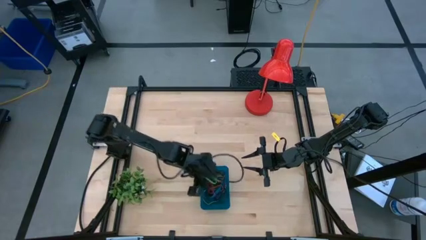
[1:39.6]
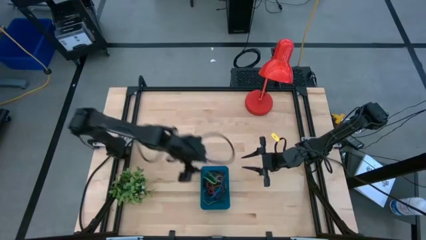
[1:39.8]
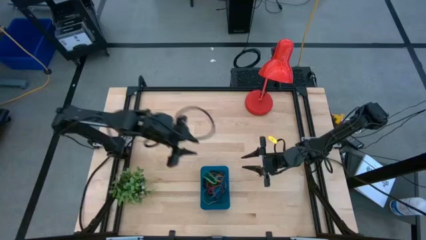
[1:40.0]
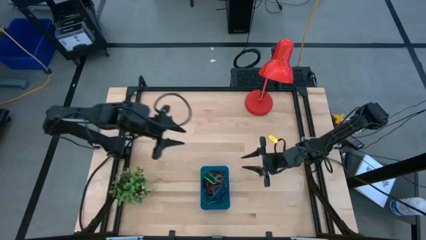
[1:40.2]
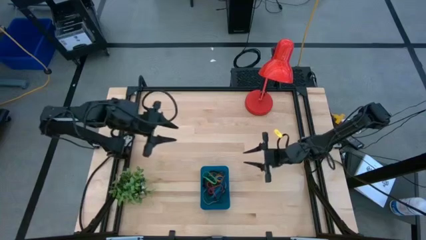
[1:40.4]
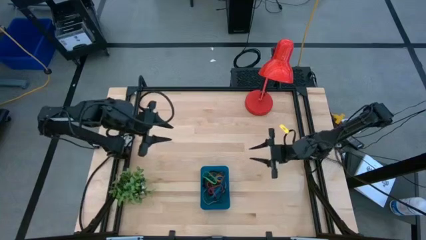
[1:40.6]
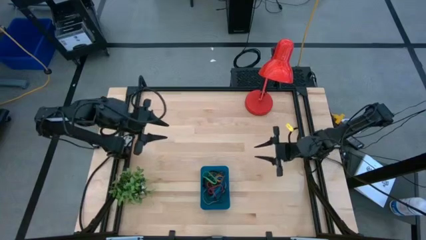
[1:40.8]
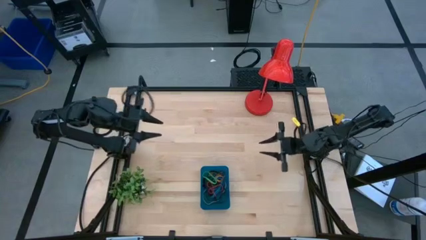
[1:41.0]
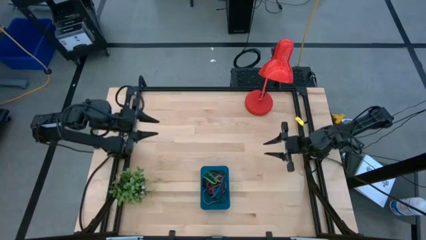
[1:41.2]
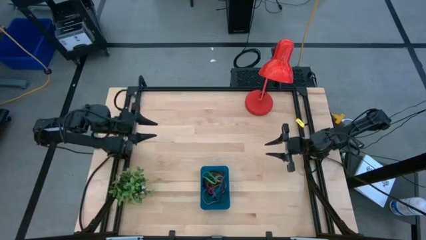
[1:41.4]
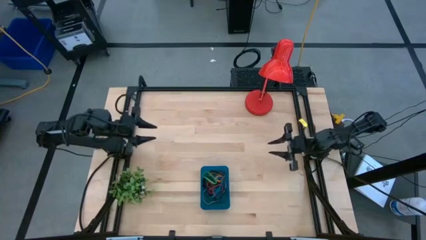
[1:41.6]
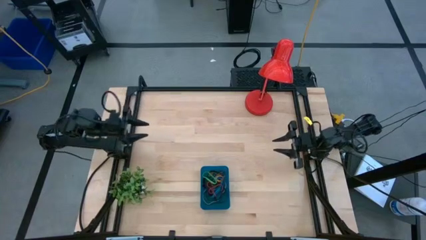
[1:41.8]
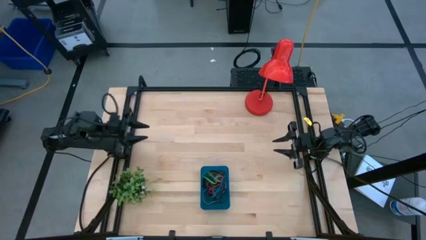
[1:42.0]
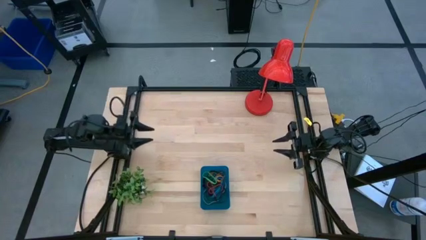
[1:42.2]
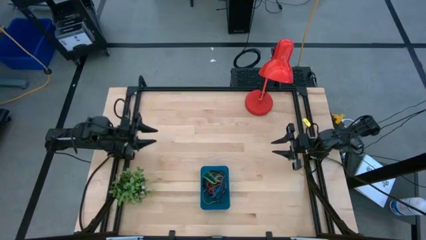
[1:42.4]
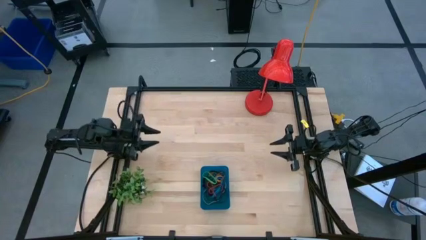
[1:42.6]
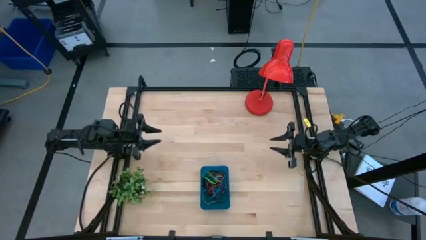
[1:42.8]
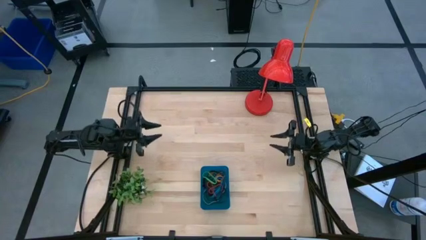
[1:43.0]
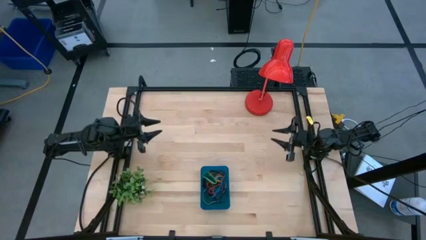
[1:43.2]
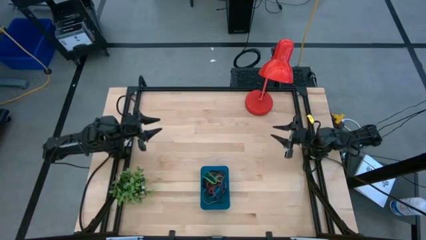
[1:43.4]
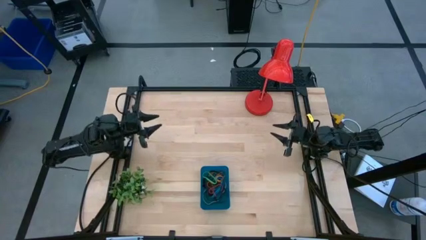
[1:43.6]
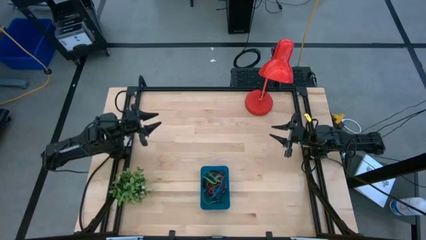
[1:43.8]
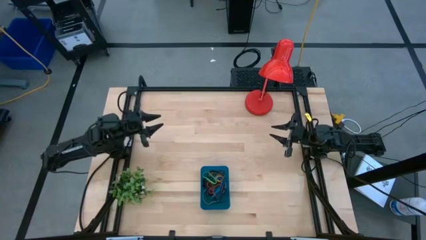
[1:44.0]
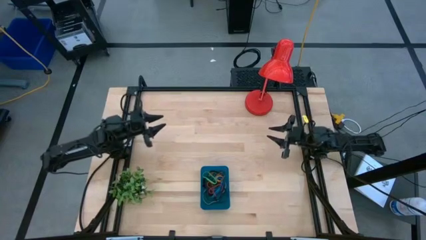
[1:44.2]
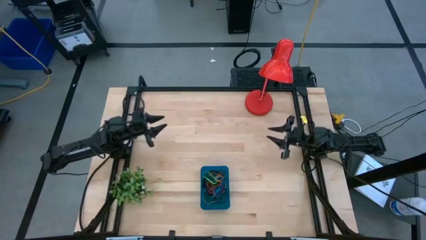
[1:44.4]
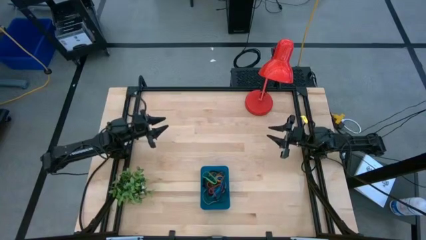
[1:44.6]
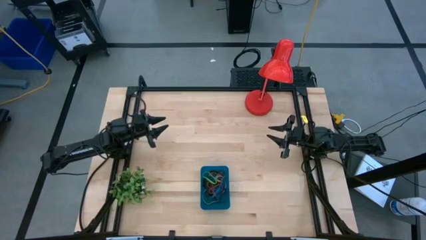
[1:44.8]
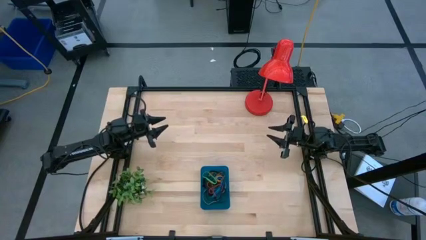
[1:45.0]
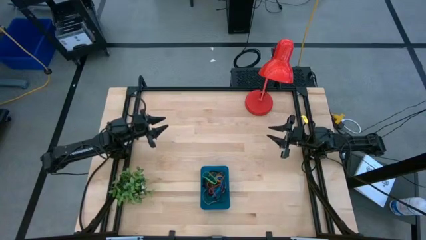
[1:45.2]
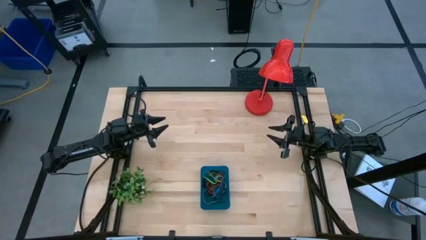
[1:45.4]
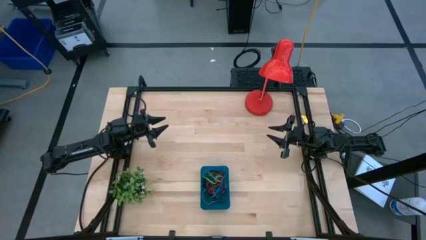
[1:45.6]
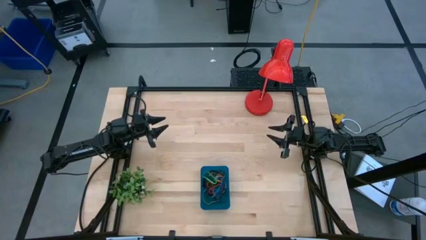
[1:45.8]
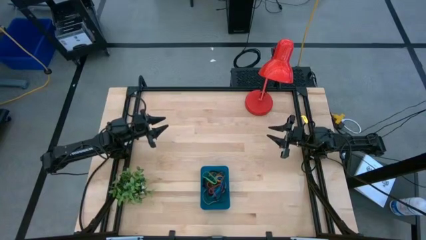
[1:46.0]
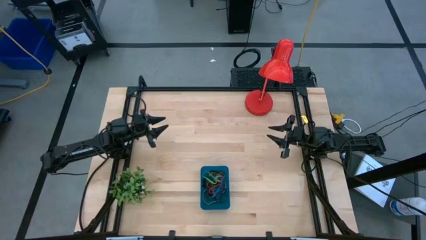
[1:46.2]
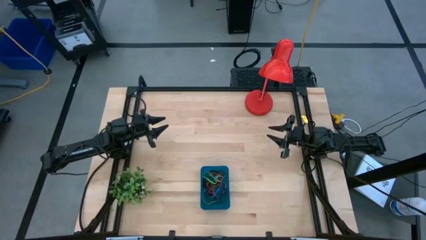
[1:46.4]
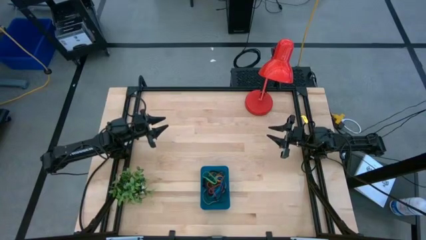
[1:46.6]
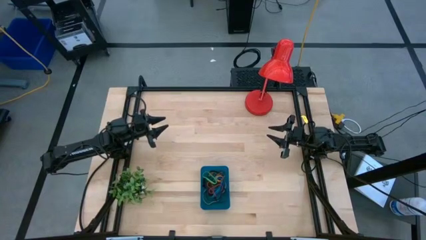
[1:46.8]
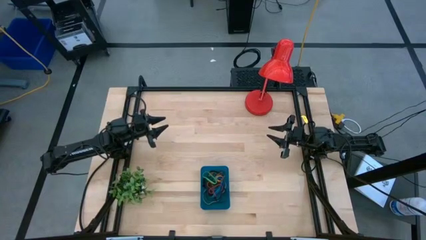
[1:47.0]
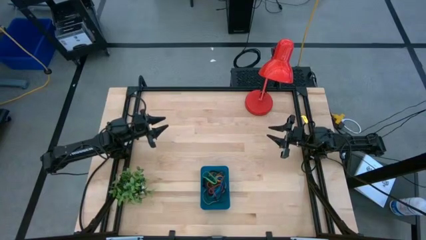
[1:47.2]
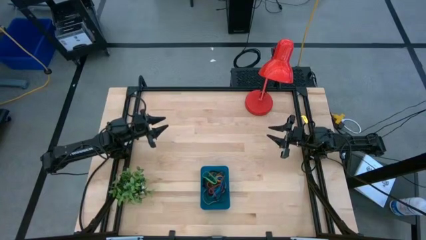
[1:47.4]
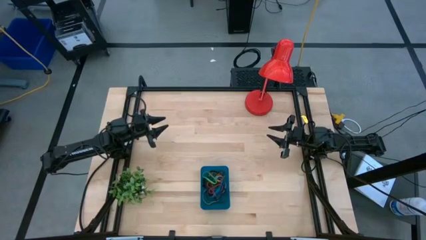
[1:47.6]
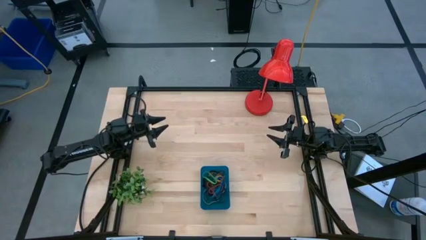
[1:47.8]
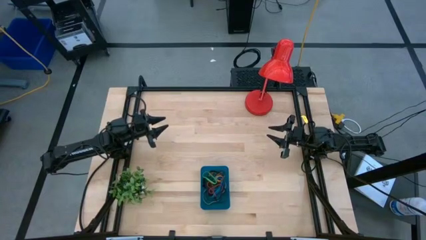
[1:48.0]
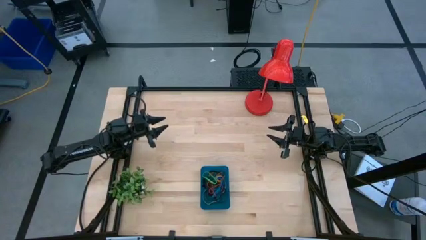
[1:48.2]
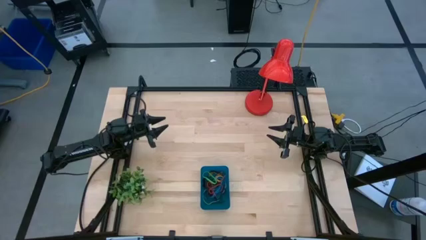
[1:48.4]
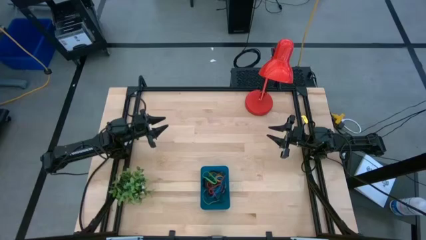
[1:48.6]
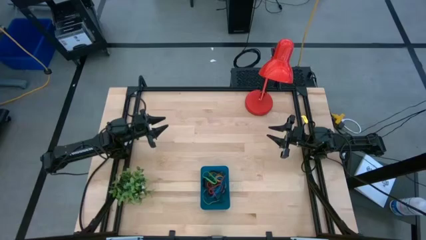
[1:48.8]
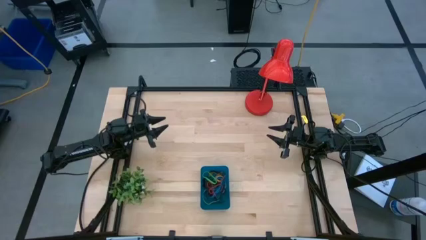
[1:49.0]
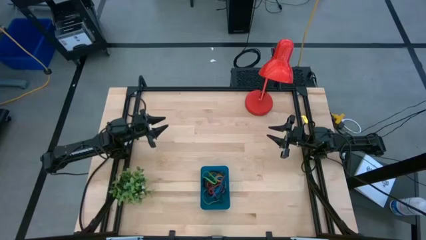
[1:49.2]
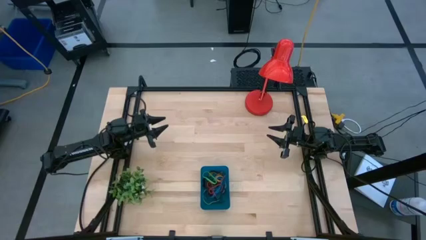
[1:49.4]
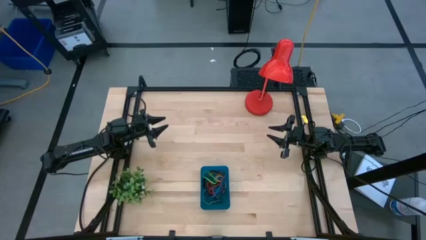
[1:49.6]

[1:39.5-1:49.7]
Task: Pick and place rubber bands into bin
Return to Home Position

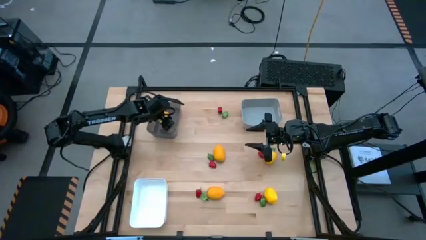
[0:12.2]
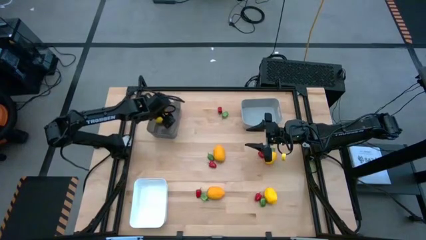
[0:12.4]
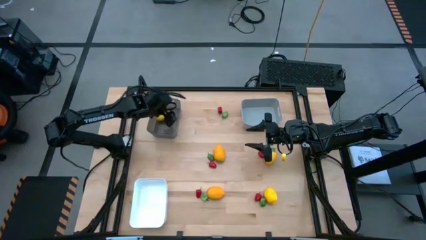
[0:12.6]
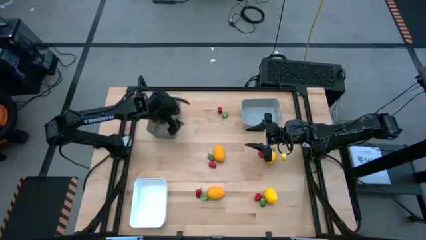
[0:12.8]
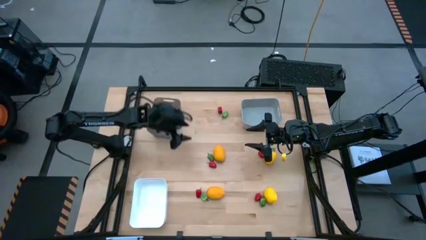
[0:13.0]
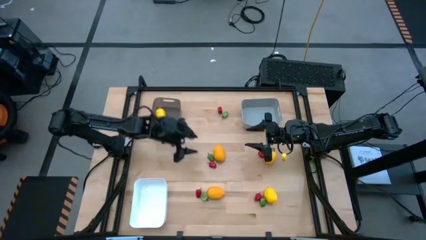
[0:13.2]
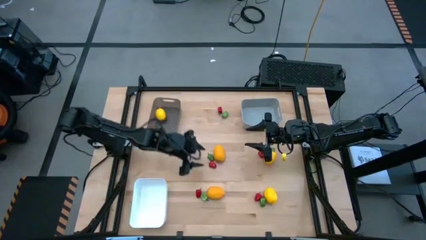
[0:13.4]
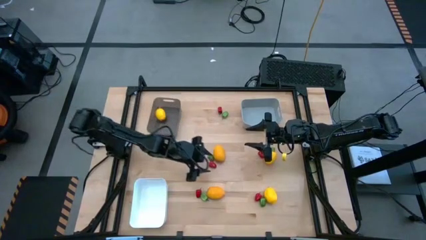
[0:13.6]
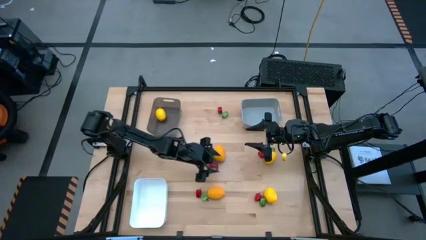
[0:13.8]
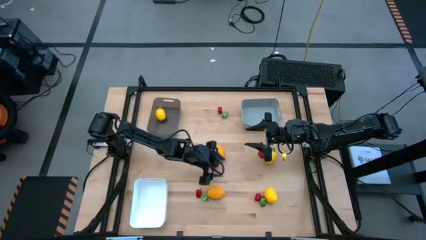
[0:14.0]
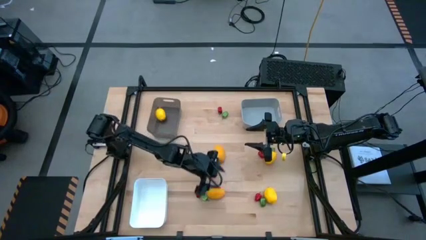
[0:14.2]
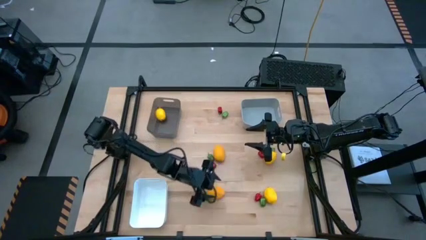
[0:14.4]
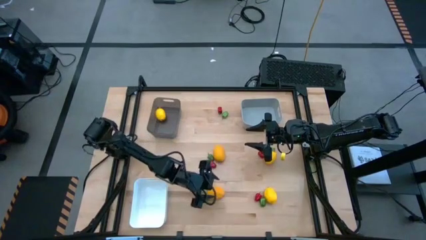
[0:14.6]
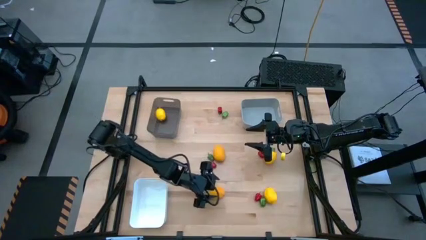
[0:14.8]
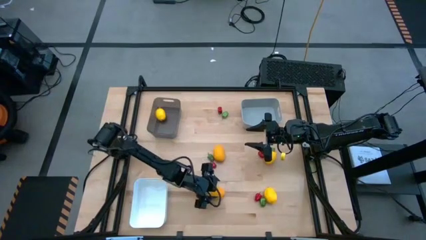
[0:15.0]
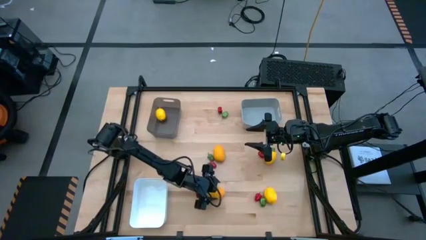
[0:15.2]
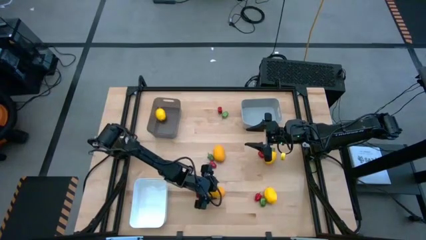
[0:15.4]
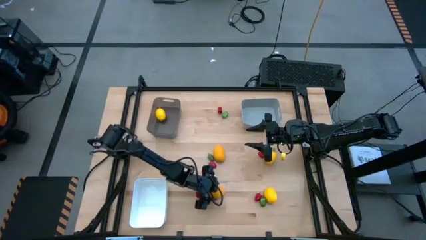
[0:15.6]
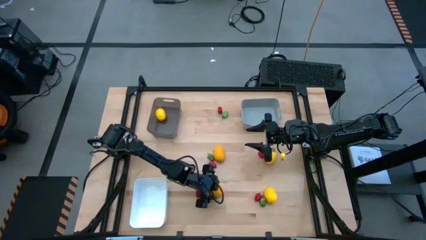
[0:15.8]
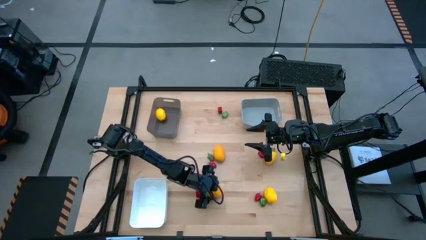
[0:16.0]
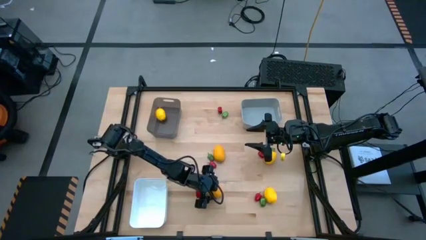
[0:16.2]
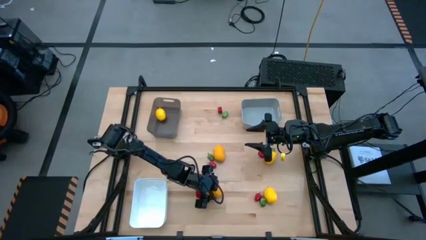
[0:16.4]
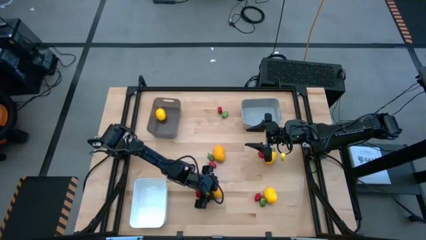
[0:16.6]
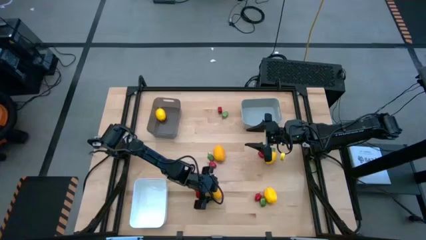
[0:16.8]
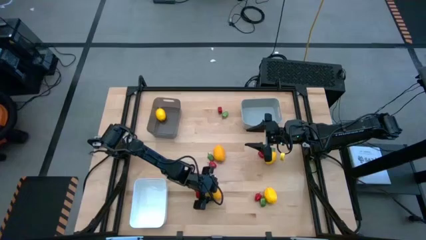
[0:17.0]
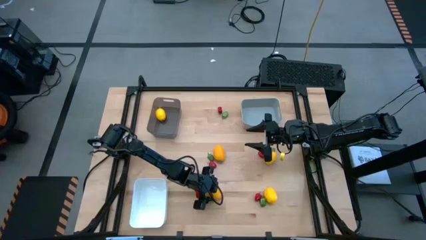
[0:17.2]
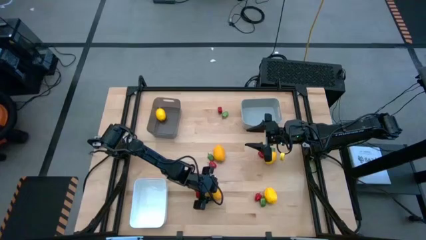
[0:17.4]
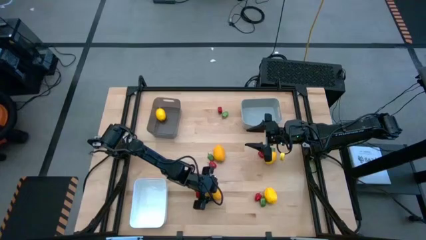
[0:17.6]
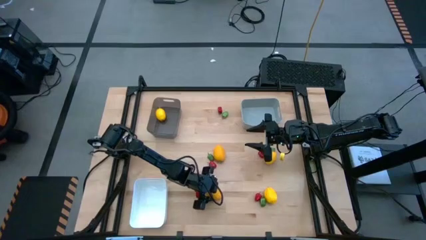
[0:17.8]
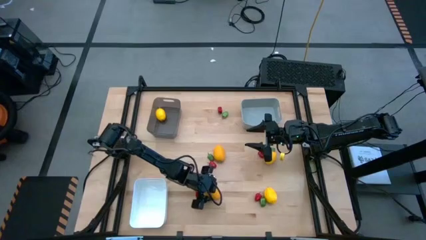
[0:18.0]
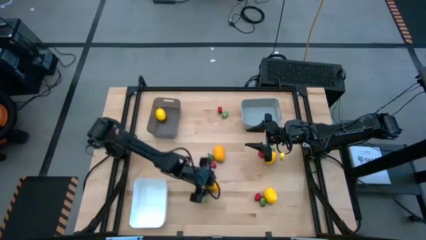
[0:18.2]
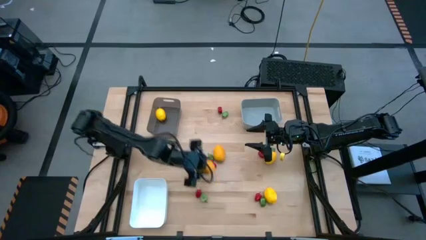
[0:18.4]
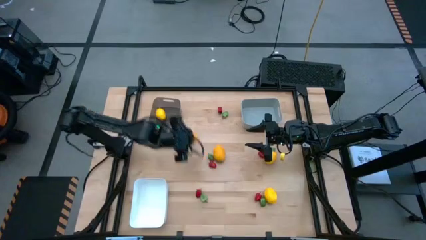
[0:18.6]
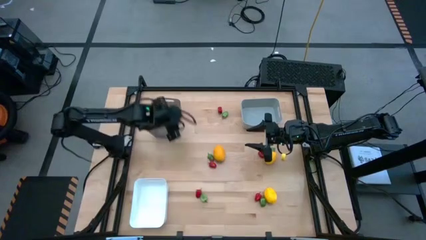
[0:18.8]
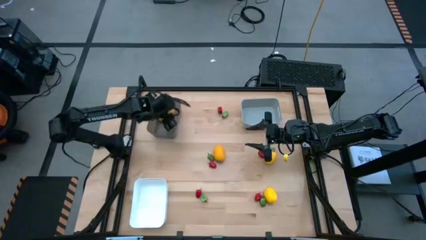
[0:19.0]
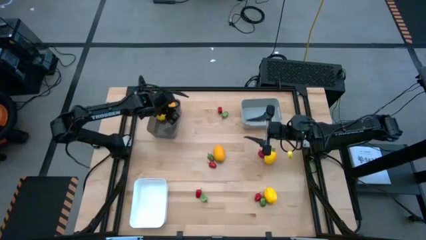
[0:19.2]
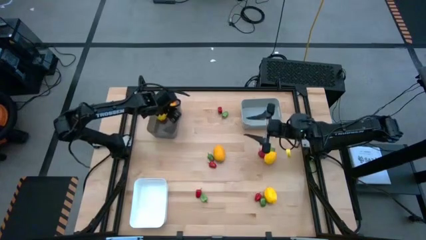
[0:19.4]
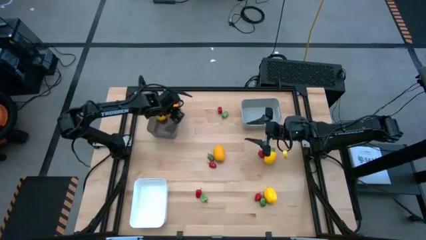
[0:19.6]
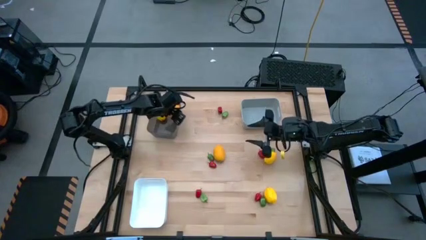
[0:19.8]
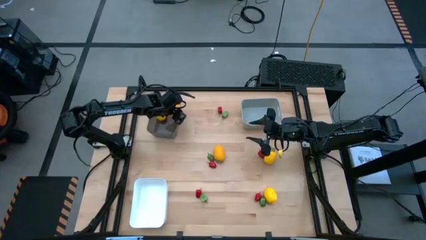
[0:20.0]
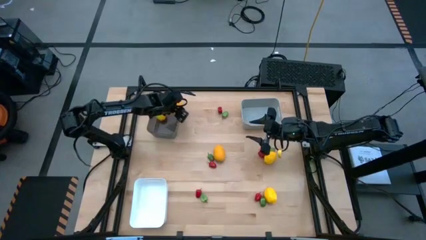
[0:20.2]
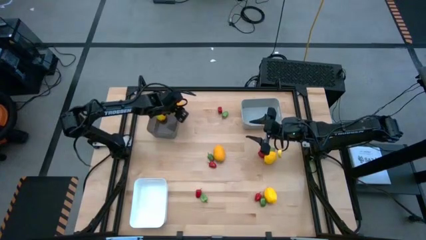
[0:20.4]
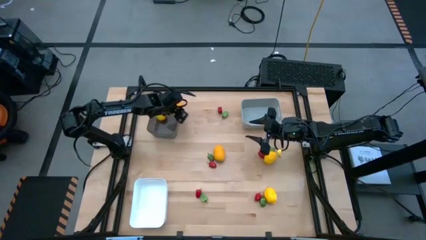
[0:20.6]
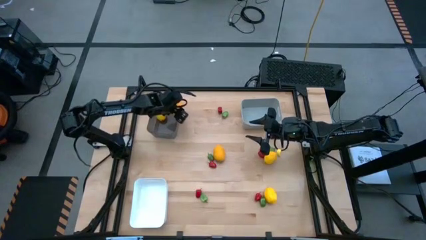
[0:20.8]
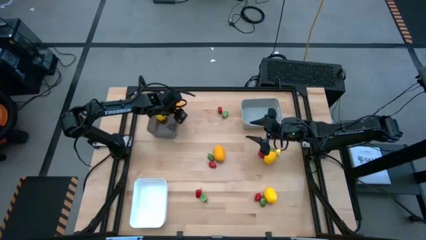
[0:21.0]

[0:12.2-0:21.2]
Task: Sort produce into baskets
Put the lemon into the black bin
